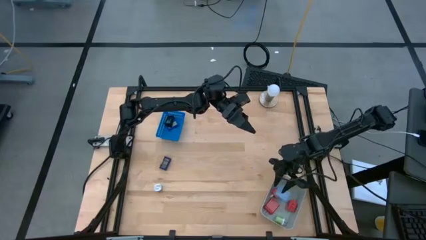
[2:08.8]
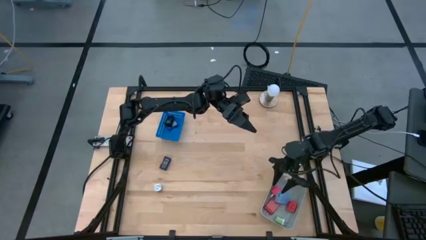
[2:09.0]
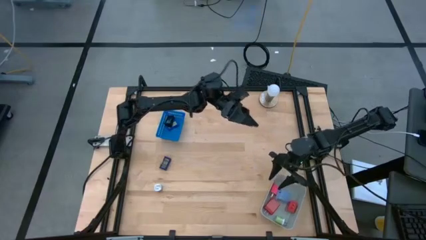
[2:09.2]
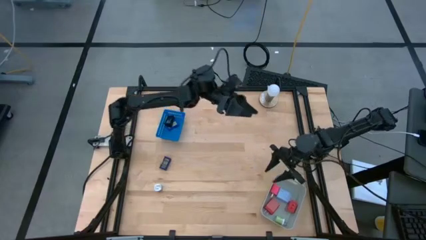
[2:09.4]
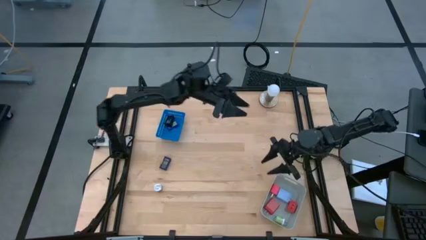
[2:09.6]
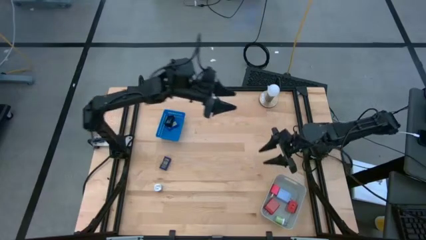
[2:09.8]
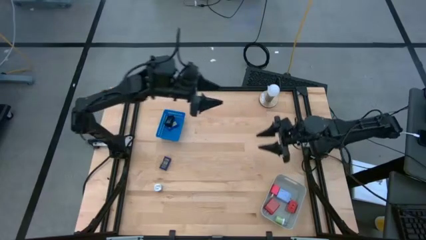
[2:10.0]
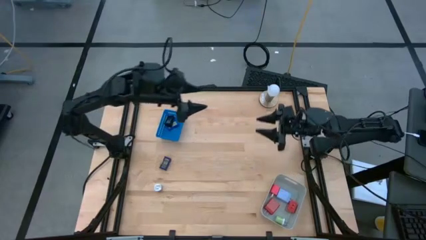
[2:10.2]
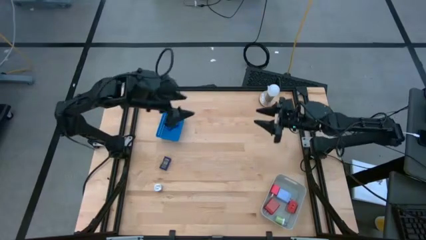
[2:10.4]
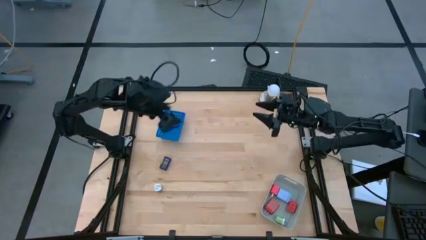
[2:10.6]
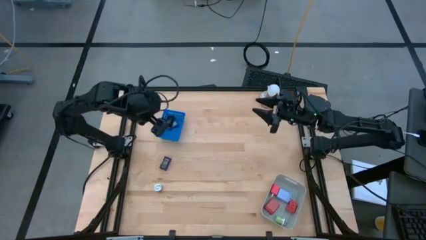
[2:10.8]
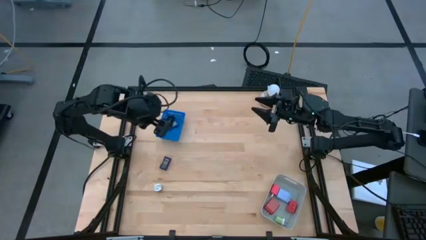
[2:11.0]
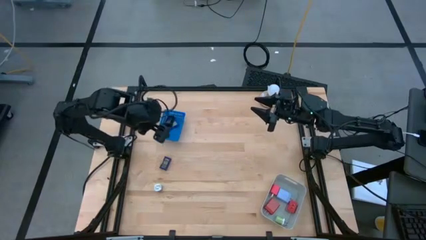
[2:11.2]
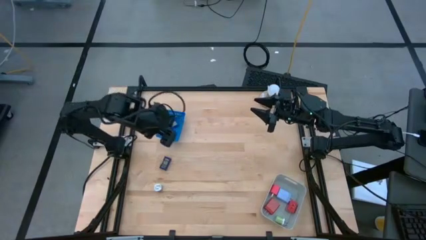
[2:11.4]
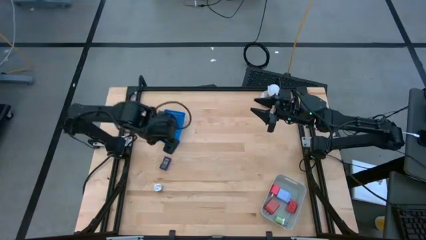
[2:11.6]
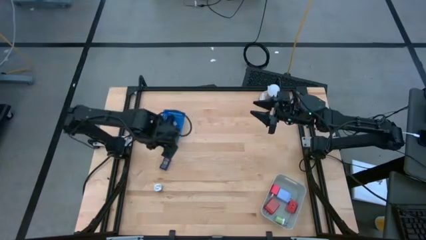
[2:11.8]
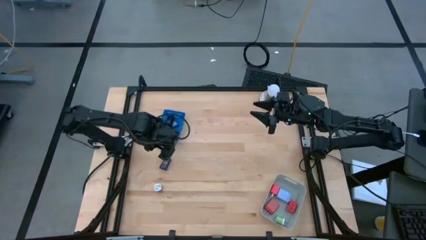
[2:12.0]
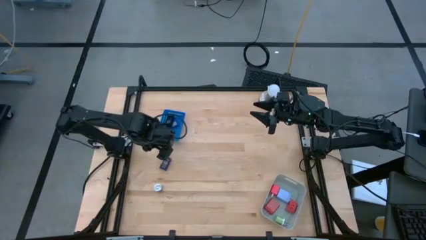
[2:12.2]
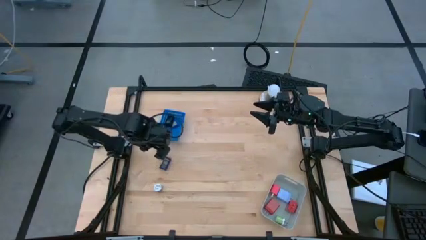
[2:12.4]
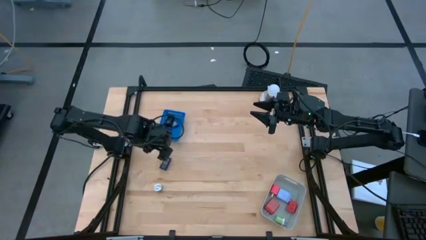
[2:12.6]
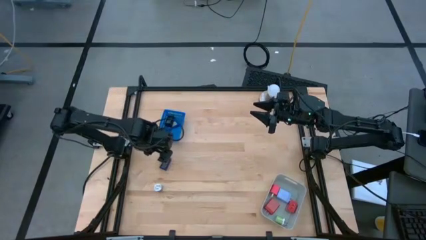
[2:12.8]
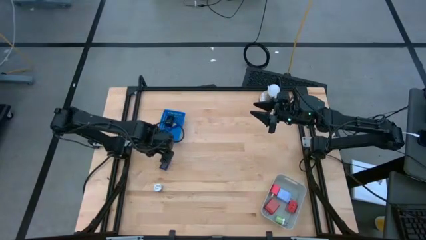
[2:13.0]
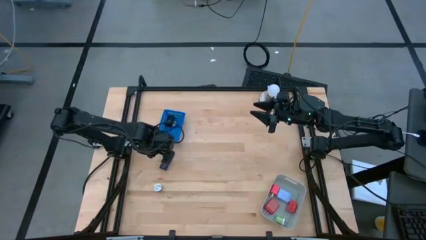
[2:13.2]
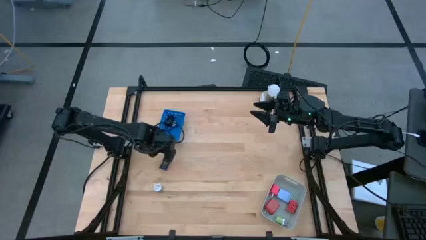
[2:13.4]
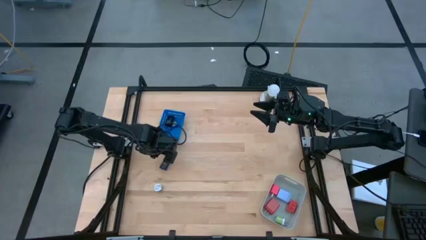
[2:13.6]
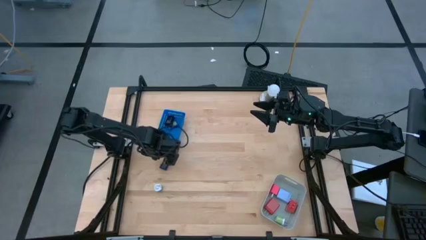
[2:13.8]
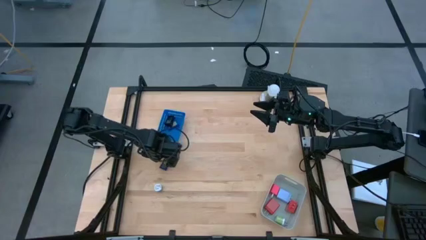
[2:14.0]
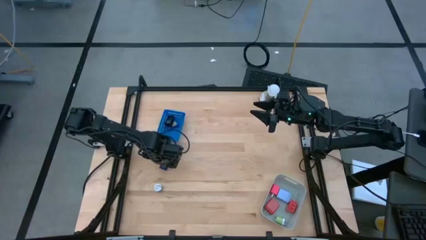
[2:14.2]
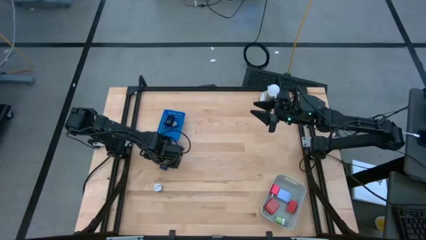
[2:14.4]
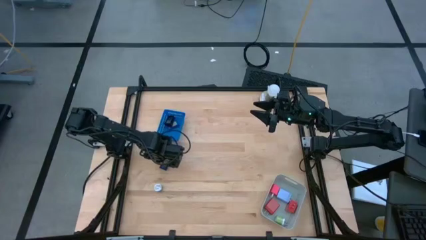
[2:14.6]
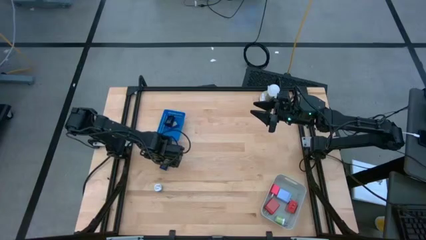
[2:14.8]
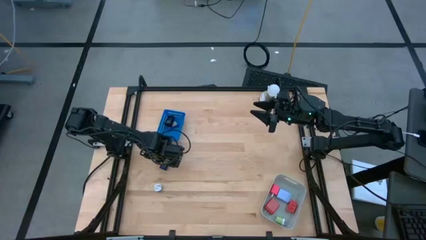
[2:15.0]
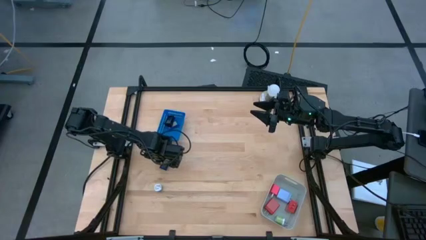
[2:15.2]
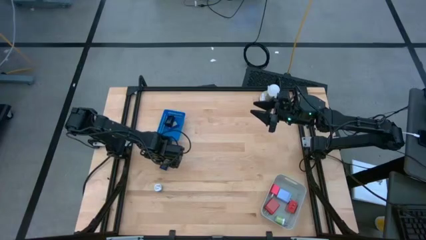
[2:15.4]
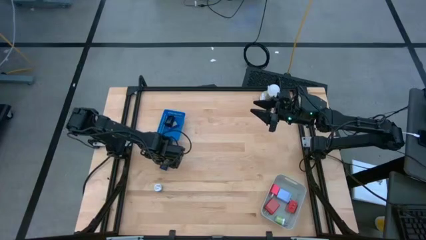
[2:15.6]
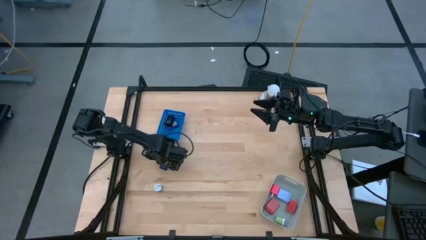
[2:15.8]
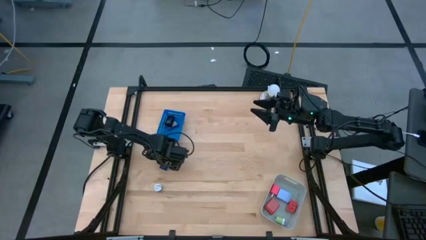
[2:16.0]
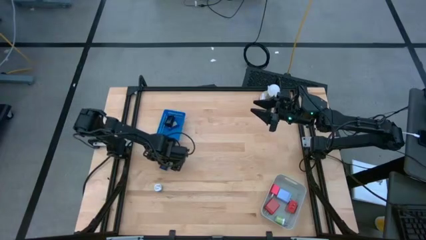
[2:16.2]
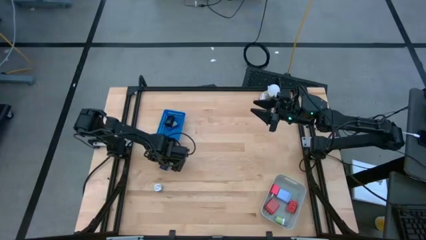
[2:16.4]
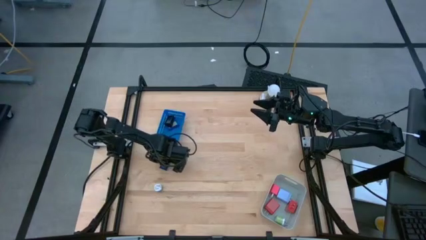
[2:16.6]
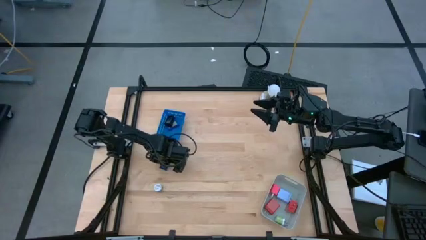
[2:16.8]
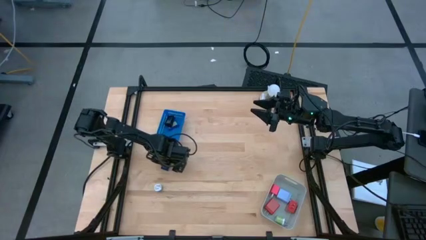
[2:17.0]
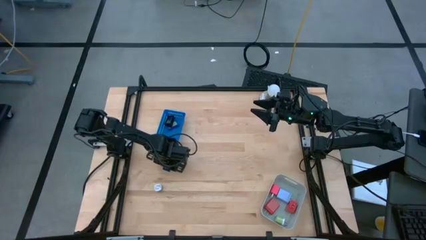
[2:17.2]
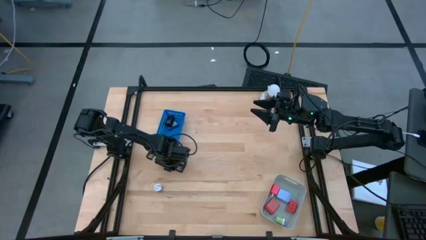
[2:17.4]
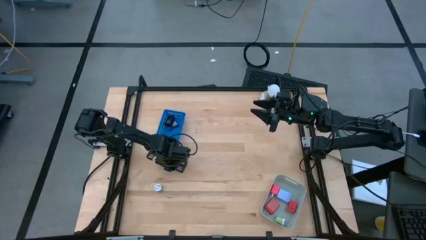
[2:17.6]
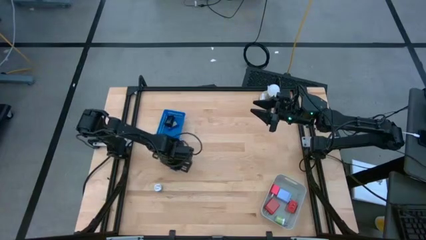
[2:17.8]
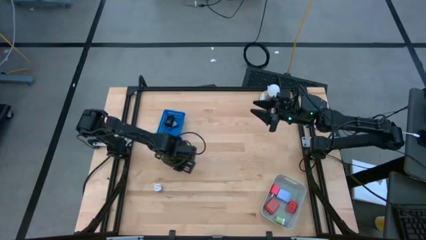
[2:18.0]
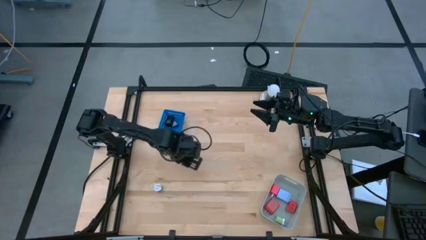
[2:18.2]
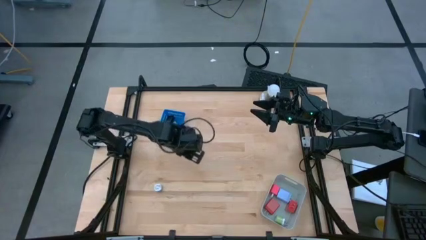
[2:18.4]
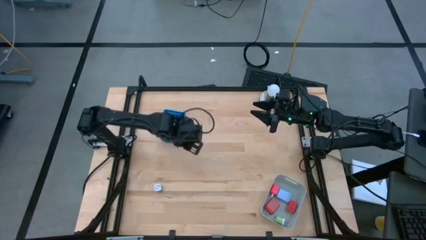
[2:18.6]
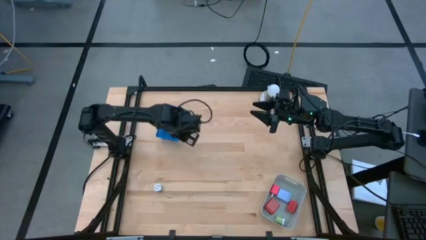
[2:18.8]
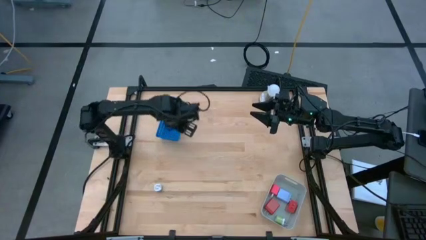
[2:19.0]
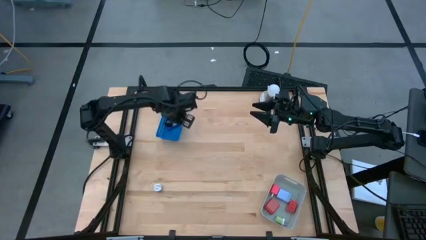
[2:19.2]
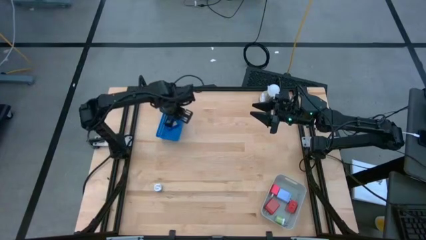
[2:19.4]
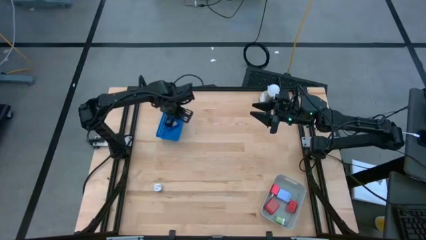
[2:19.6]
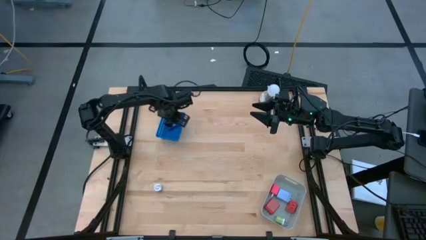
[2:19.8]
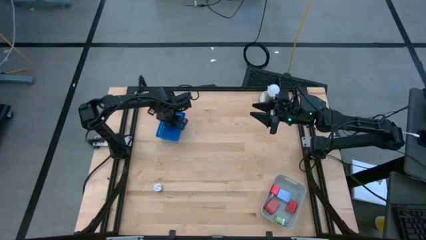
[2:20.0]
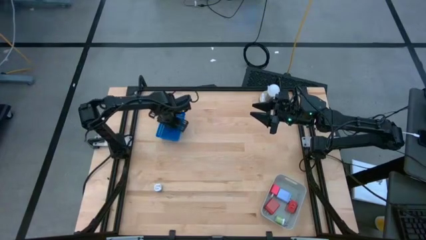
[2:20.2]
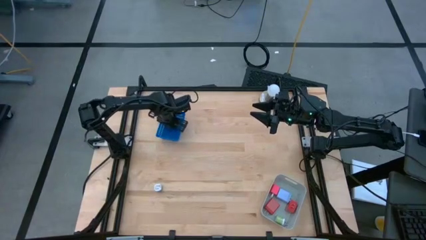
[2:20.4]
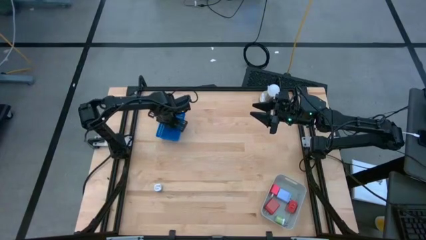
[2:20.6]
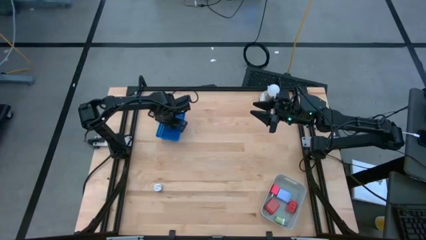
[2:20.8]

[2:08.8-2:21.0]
Task: Pick & Place Office items
Put the dark blue digital timer into the blue bin
